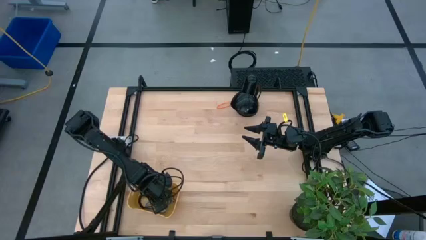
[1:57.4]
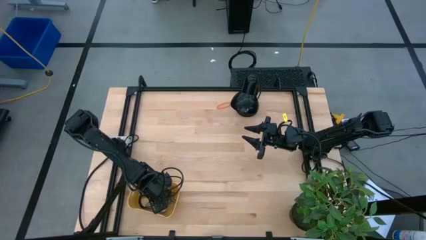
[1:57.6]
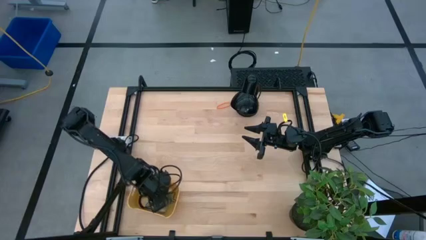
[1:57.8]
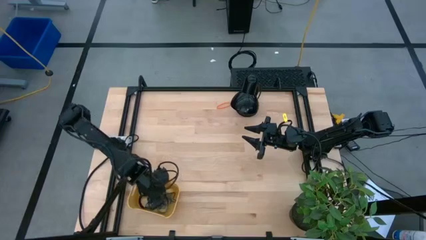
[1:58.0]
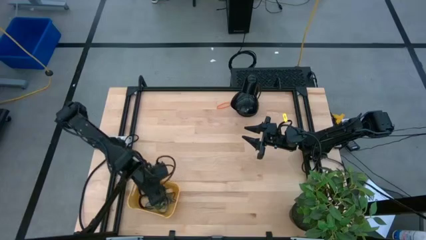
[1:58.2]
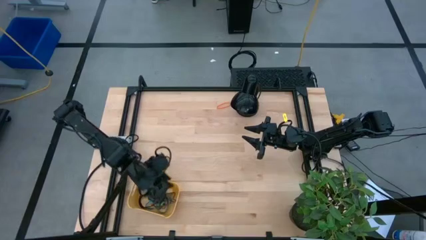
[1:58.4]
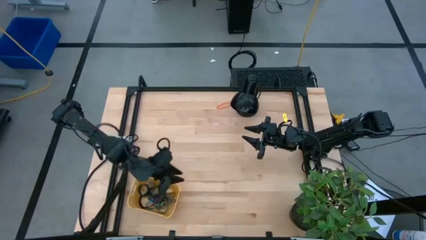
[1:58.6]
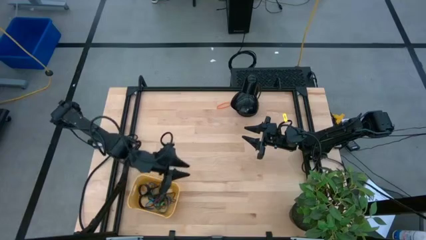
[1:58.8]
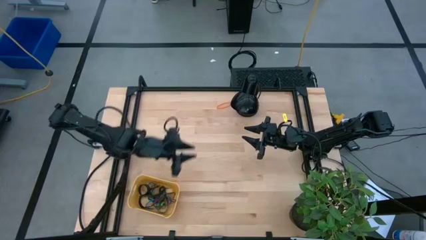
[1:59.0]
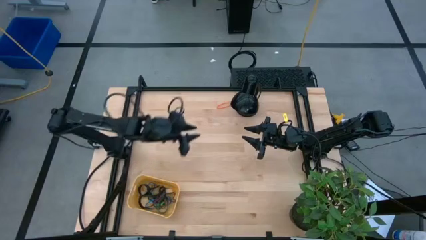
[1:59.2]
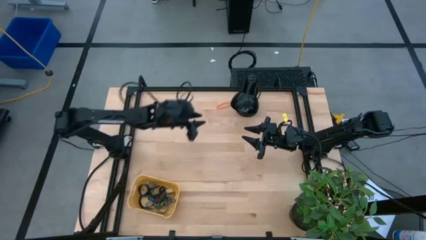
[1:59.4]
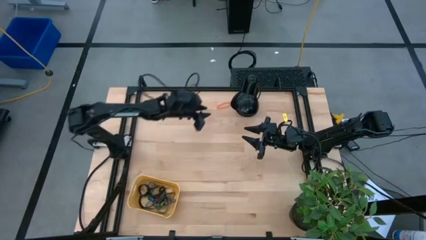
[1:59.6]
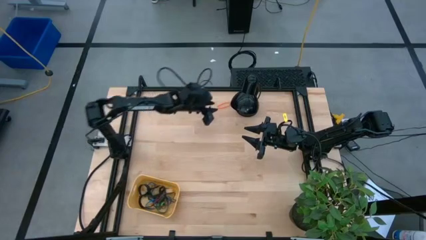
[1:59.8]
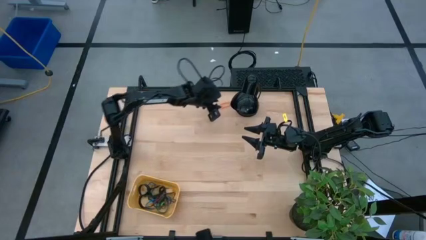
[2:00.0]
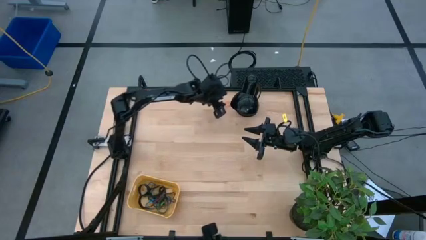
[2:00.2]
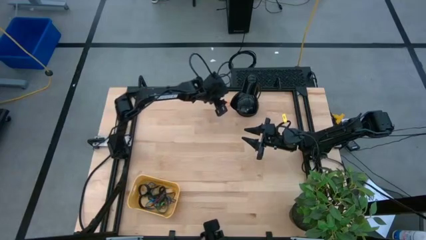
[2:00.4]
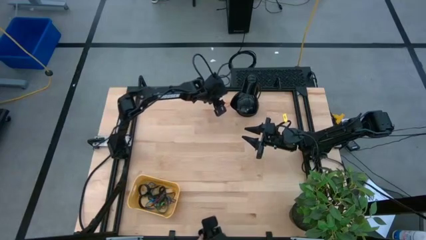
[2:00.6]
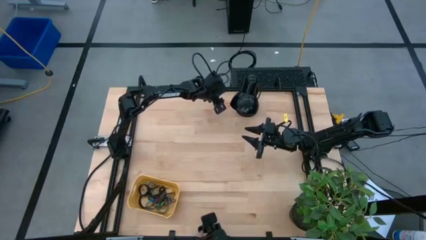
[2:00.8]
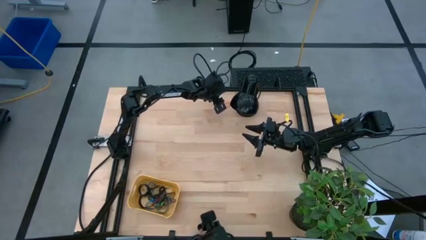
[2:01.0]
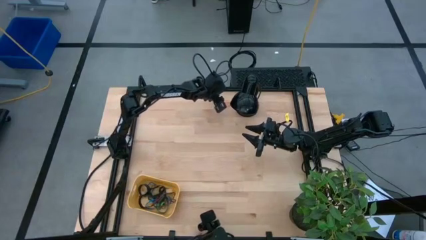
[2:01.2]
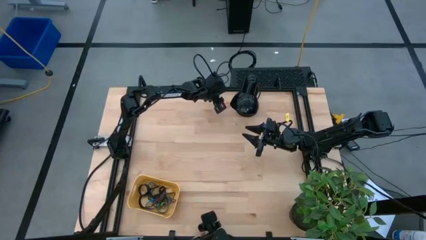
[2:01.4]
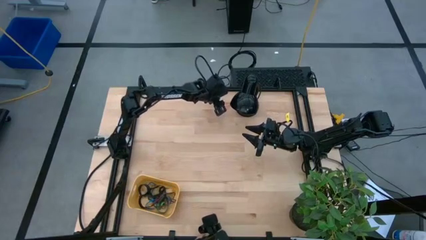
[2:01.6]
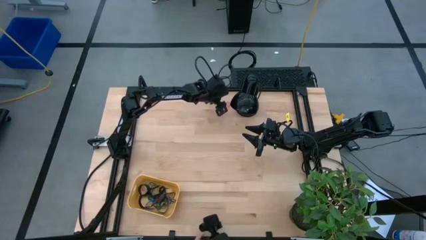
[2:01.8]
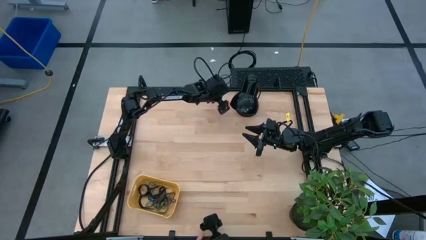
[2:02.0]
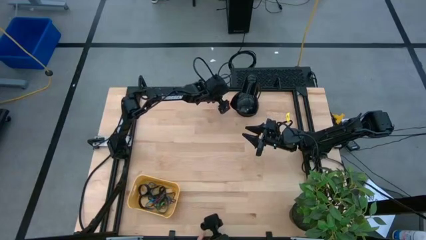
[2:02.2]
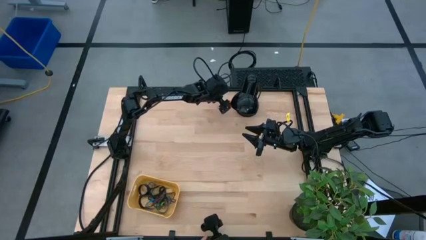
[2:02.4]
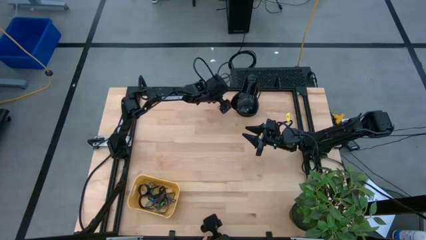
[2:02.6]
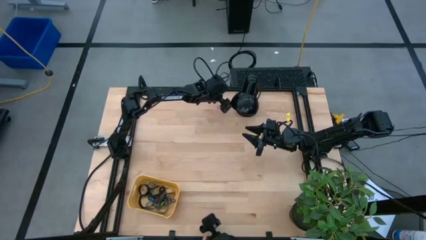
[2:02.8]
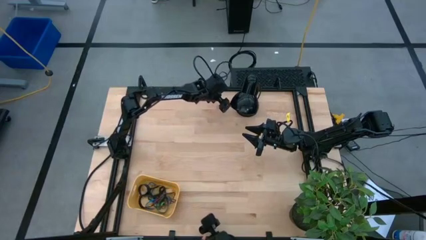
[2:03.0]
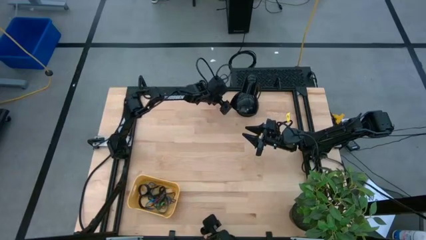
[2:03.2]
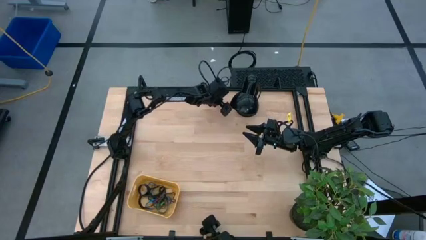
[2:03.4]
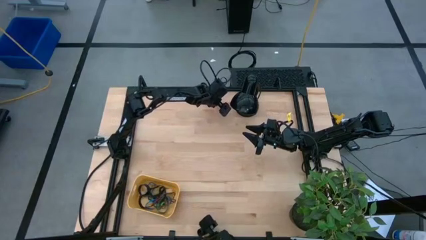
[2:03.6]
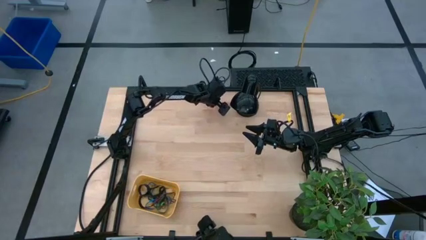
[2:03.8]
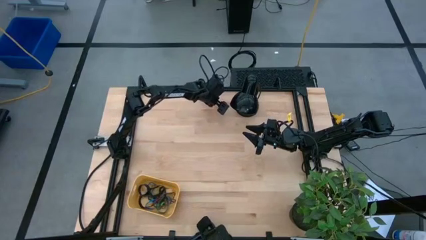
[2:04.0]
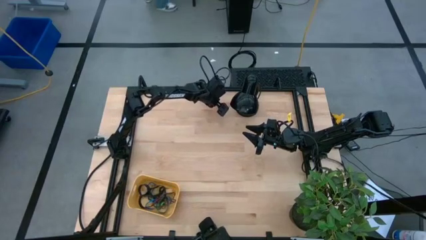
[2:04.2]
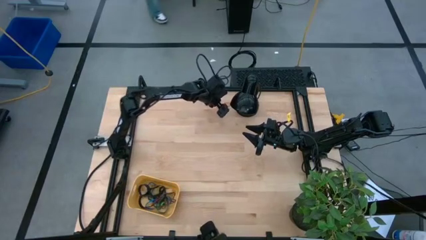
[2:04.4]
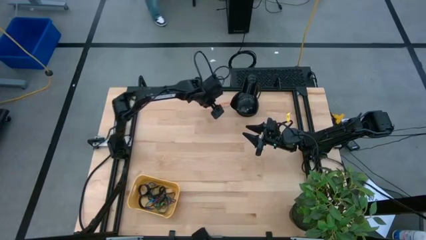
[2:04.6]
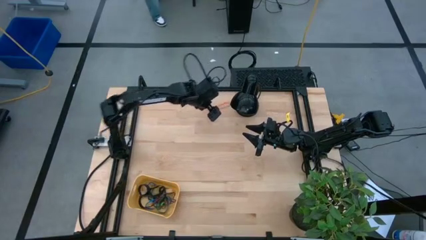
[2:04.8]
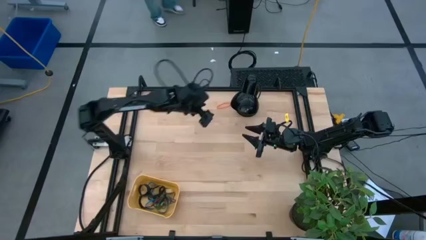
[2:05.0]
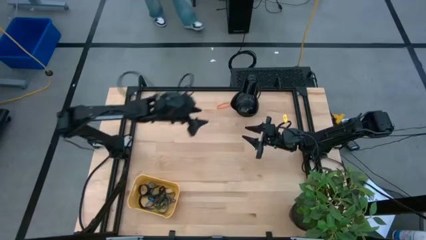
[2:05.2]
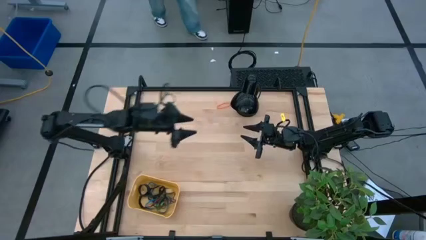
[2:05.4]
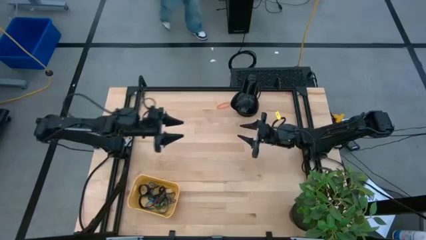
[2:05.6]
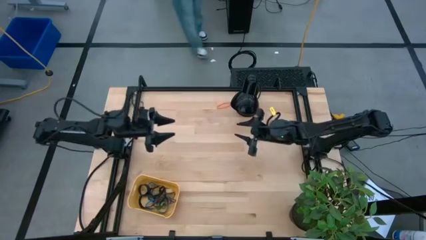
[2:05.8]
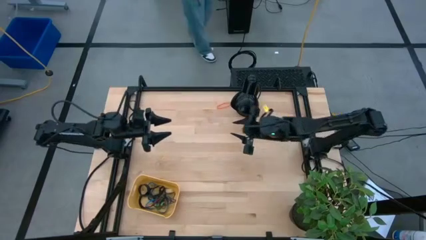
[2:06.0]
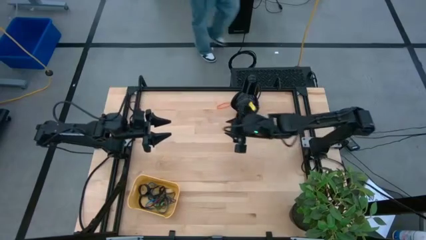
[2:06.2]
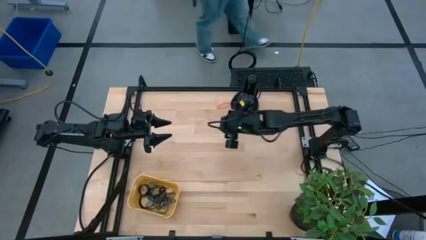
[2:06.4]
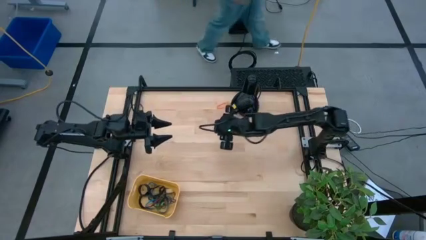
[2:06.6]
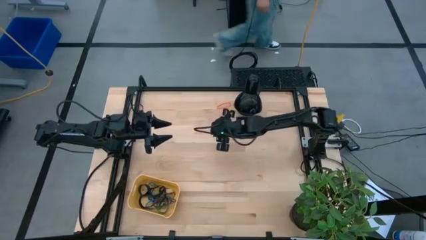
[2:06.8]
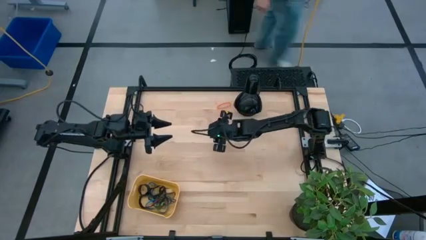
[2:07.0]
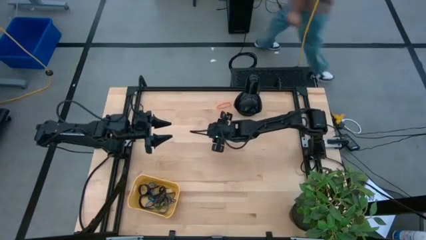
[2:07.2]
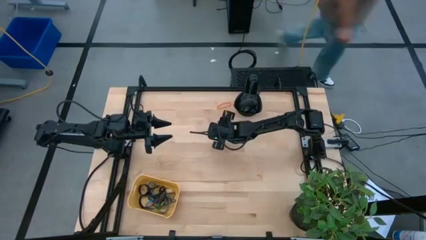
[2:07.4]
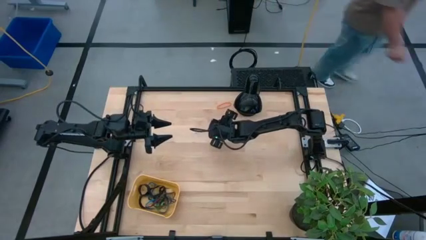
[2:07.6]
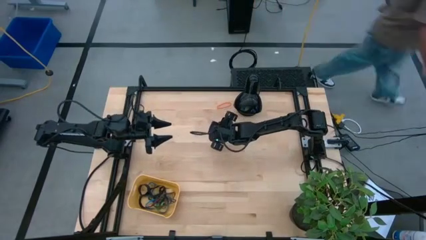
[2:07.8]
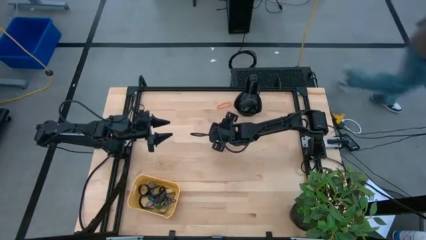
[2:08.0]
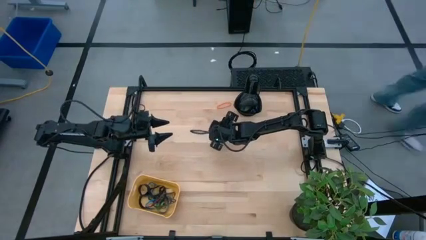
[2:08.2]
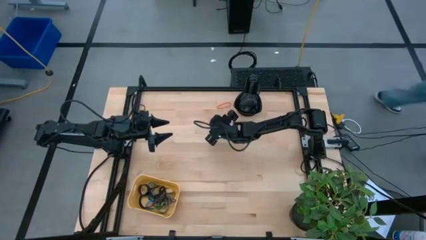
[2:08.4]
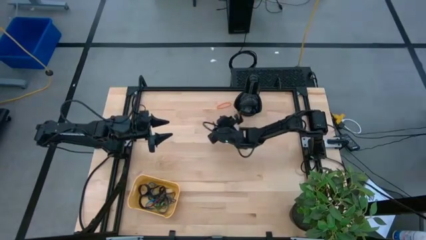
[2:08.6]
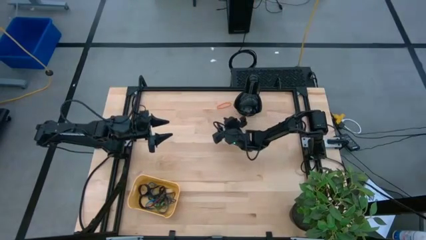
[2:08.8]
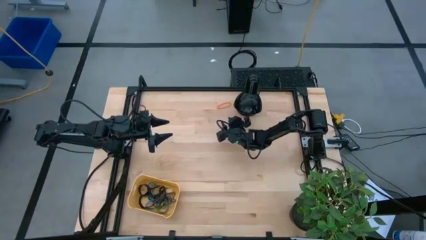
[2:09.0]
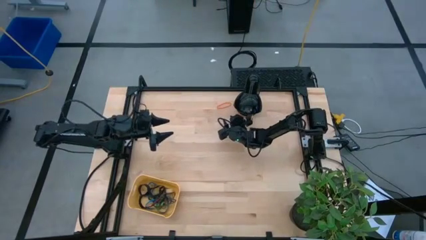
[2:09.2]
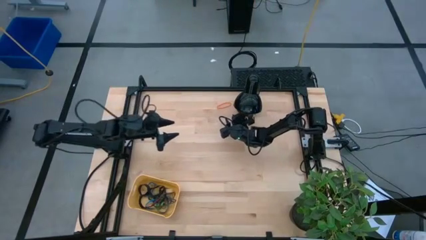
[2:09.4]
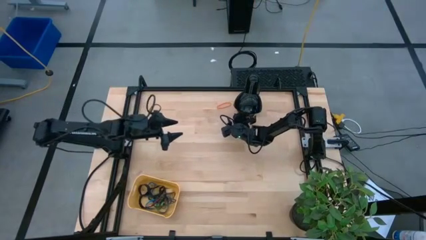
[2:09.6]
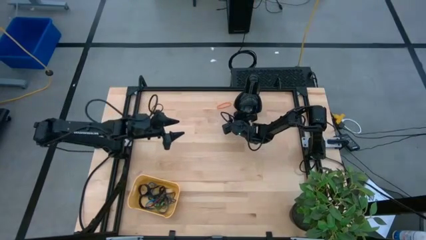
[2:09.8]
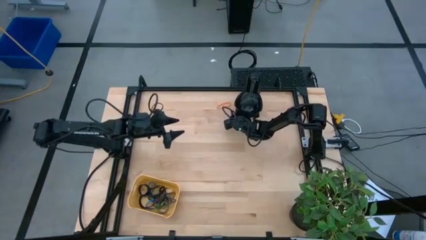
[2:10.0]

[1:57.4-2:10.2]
Task: Pick and place rubber bands into bin
Put the orange rubberband into the yellow bin

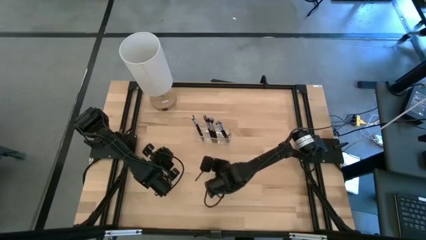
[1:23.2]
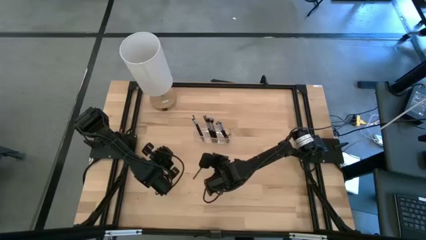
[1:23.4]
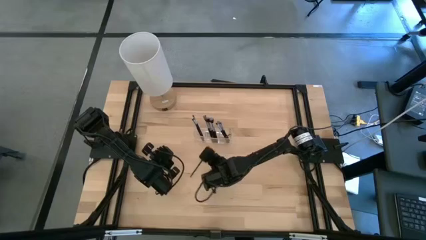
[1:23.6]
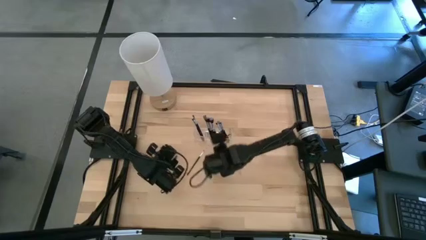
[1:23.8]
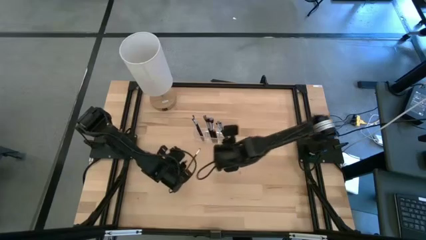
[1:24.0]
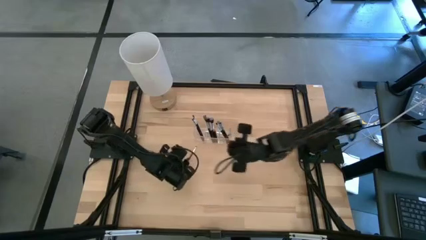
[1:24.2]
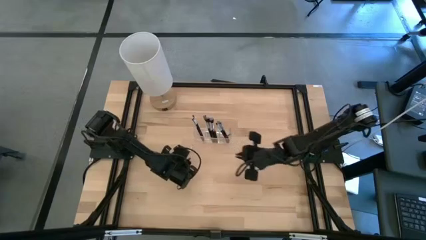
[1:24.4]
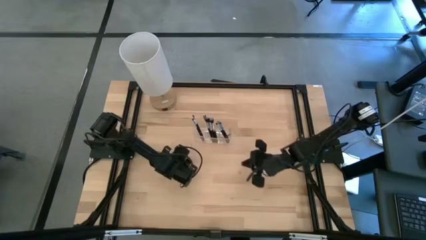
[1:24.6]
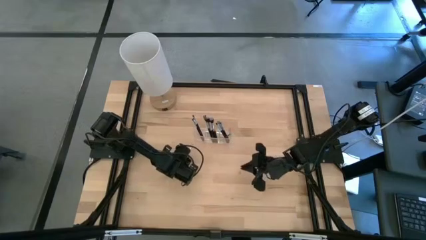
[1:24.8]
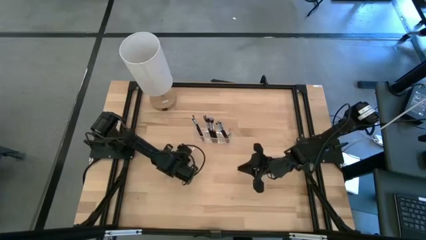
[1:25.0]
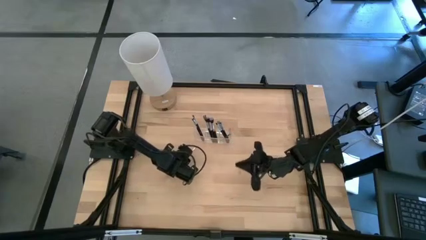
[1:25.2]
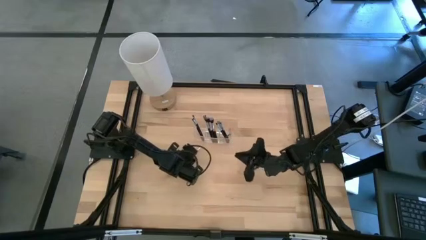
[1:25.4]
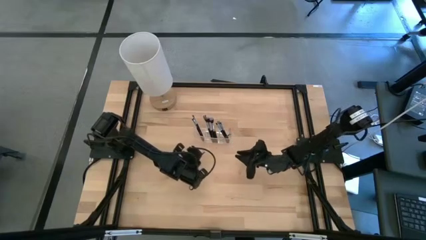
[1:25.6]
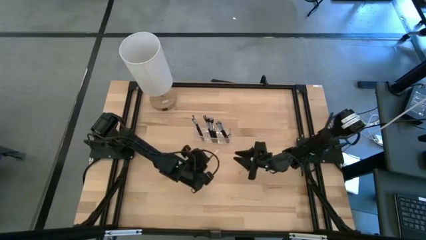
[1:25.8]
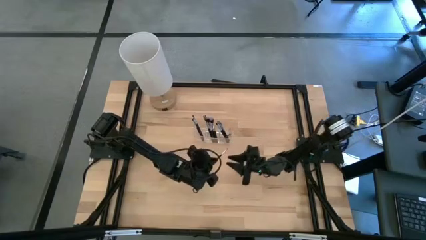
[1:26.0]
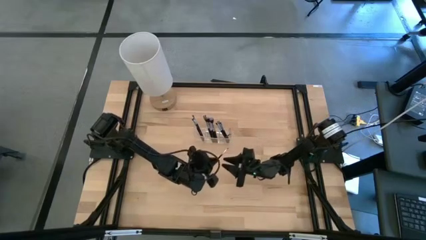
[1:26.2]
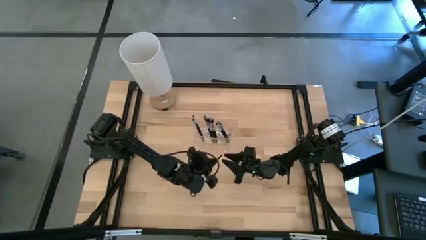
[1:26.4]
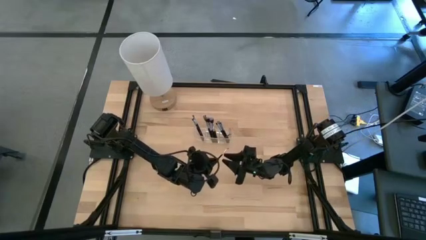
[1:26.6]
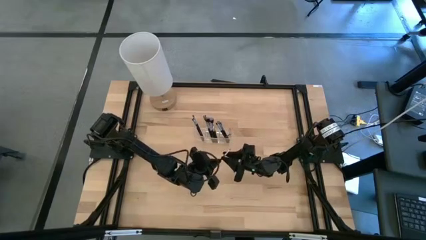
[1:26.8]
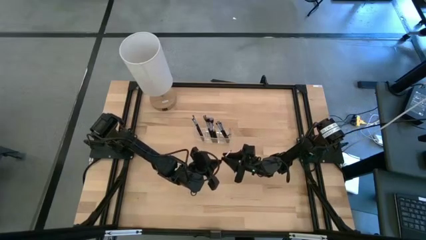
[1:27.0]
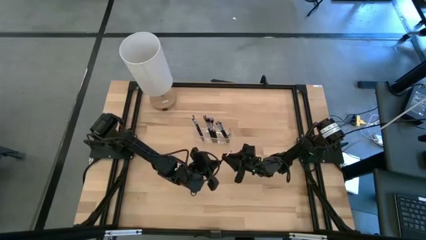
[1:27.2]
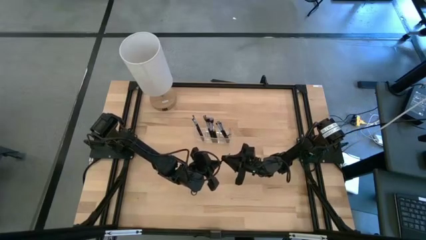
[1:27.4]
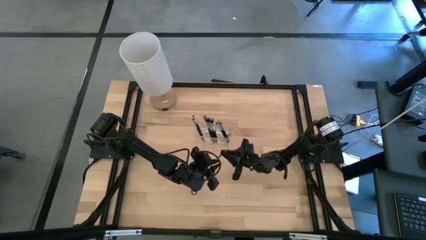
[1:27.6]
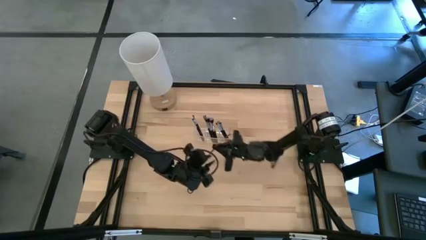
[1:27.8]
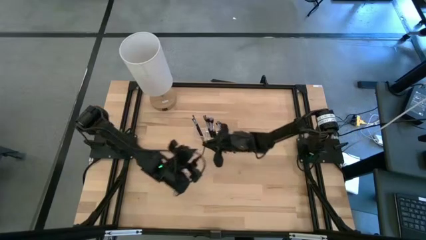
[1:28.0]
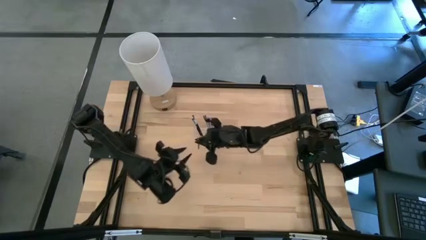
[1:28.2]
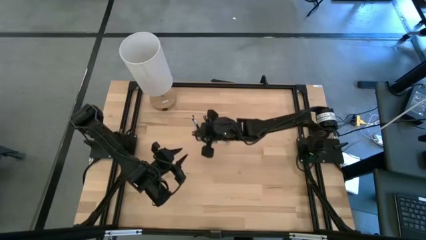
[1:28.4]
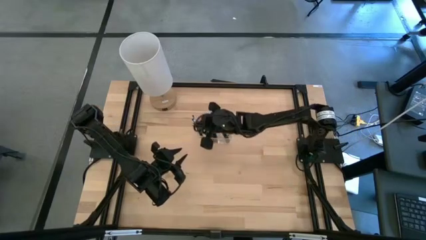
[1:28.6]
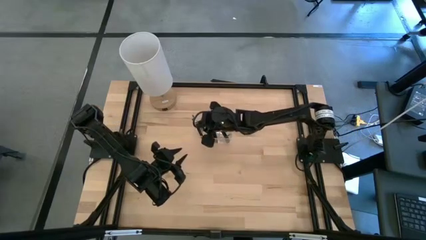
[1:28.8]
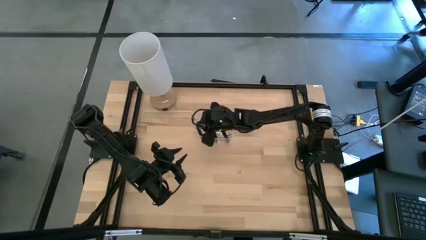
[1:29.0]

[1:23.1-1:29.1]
Task: Put items in baskets/containers
Put the black foundation brush into the transparent organizer
